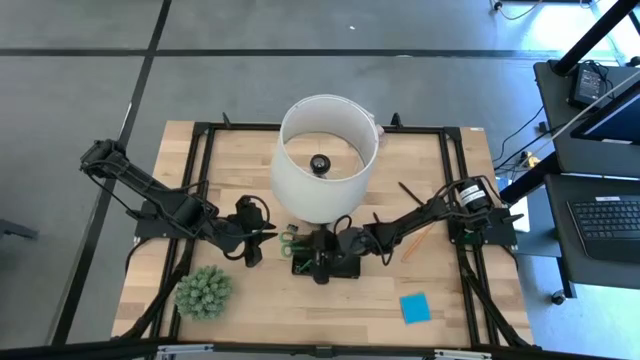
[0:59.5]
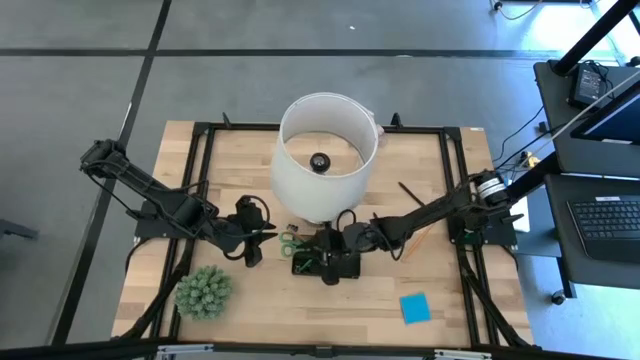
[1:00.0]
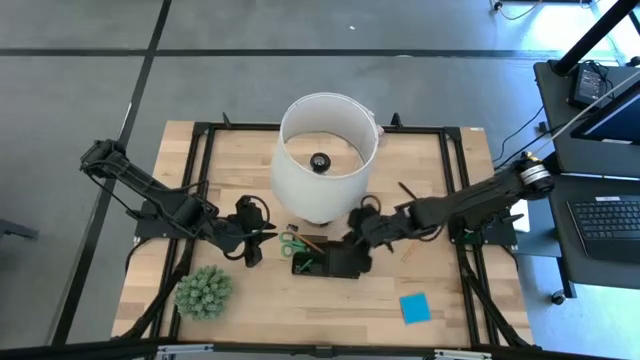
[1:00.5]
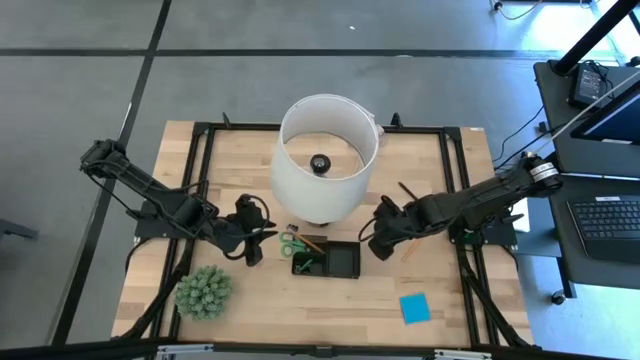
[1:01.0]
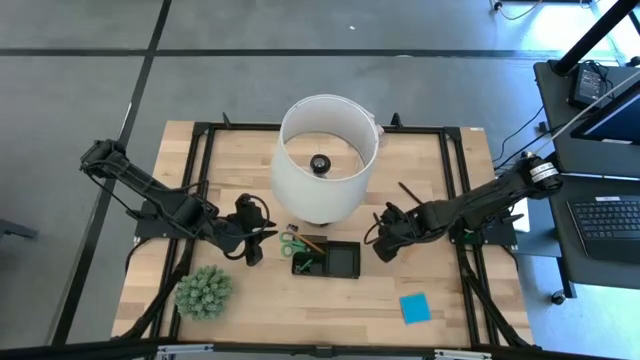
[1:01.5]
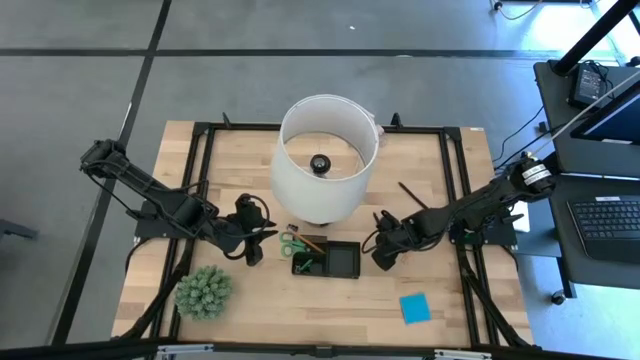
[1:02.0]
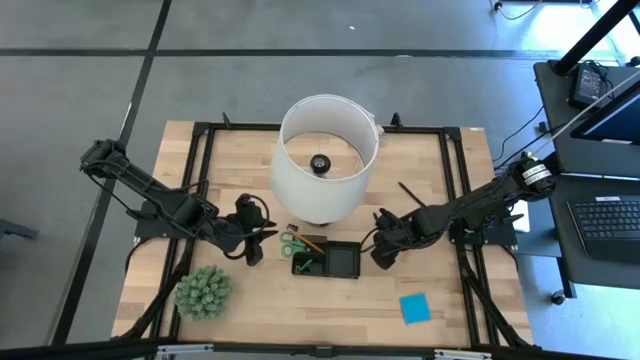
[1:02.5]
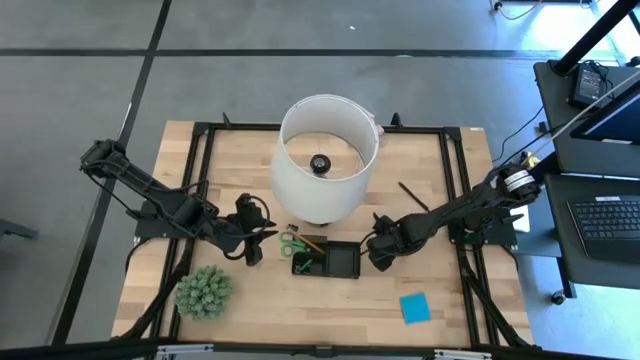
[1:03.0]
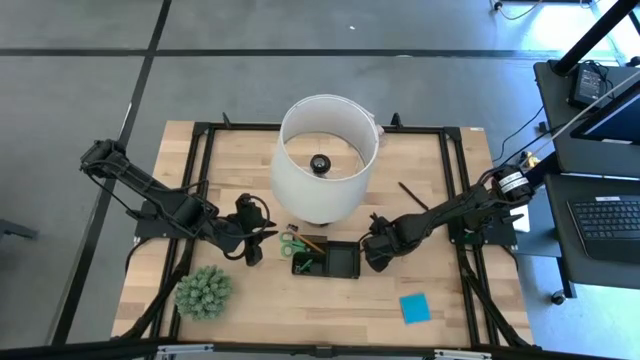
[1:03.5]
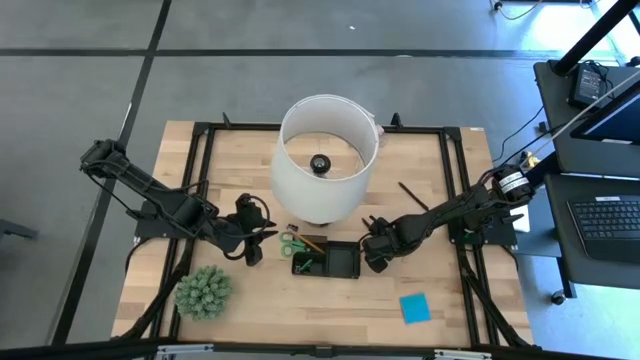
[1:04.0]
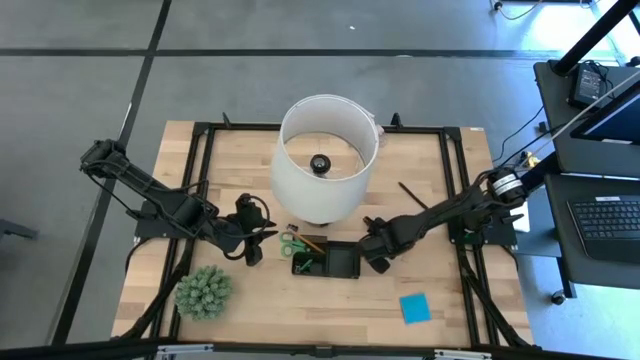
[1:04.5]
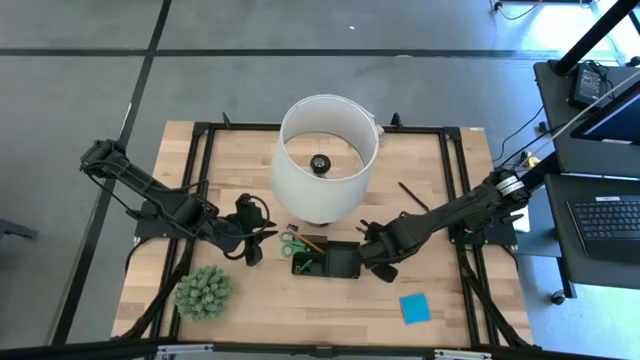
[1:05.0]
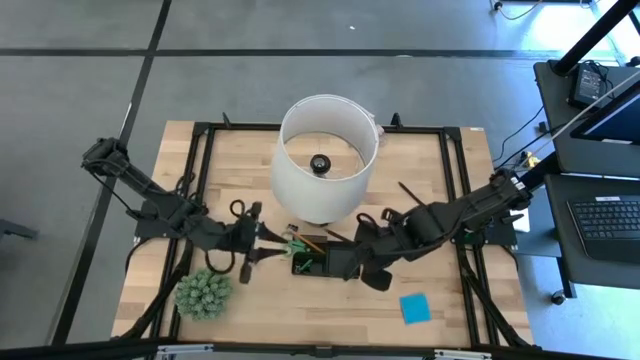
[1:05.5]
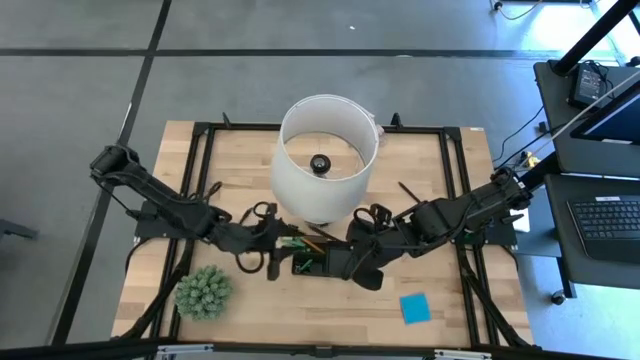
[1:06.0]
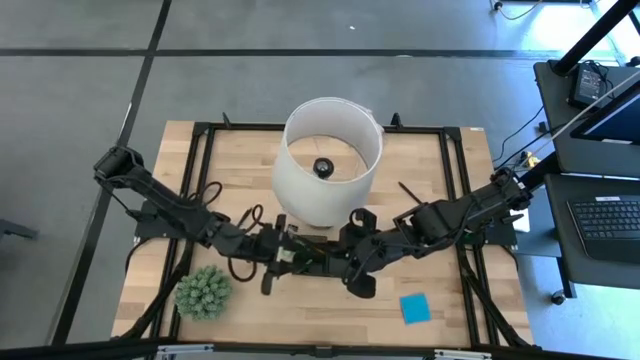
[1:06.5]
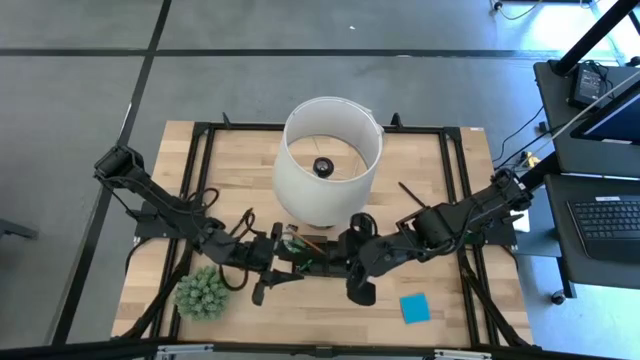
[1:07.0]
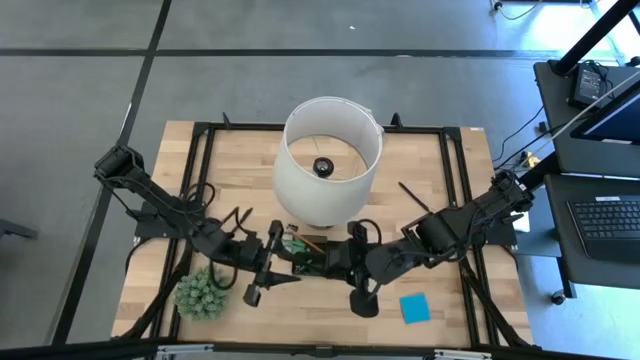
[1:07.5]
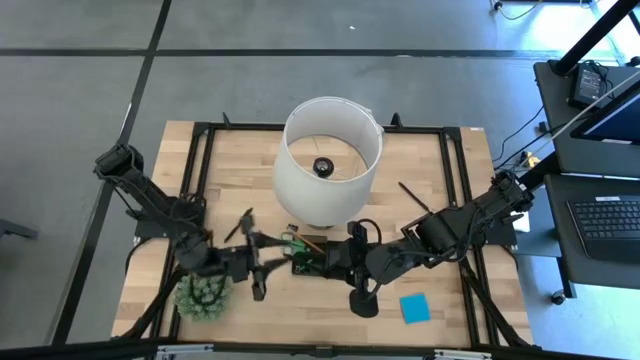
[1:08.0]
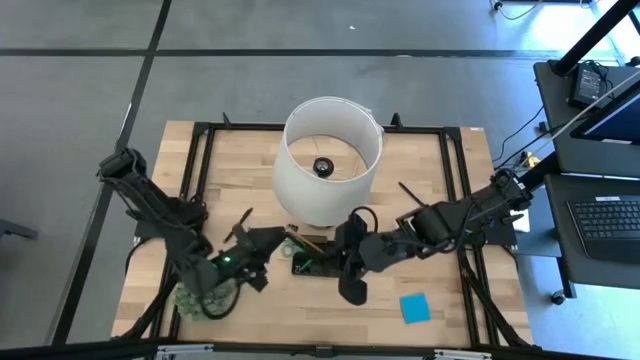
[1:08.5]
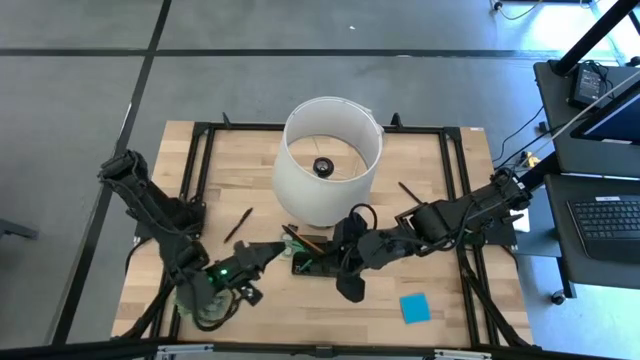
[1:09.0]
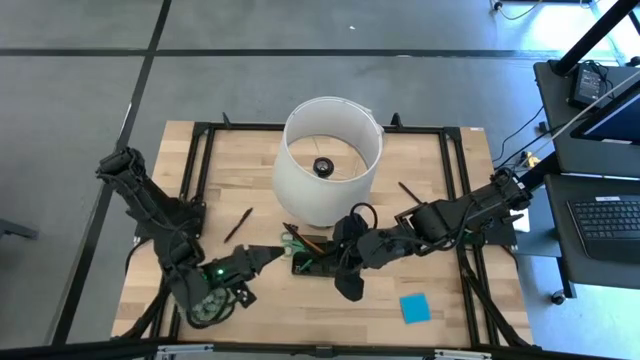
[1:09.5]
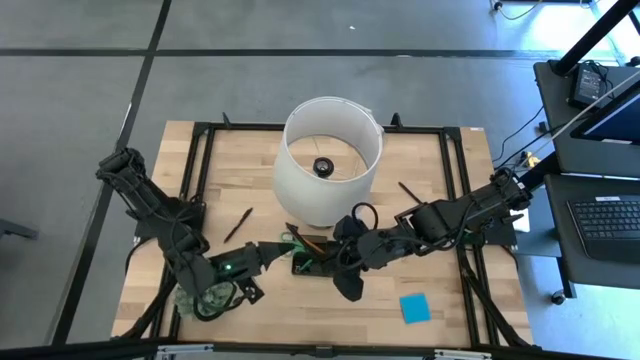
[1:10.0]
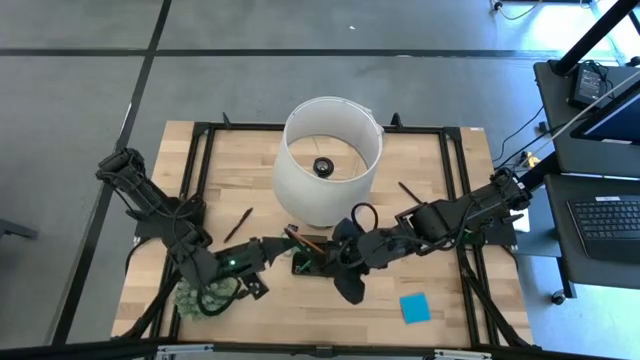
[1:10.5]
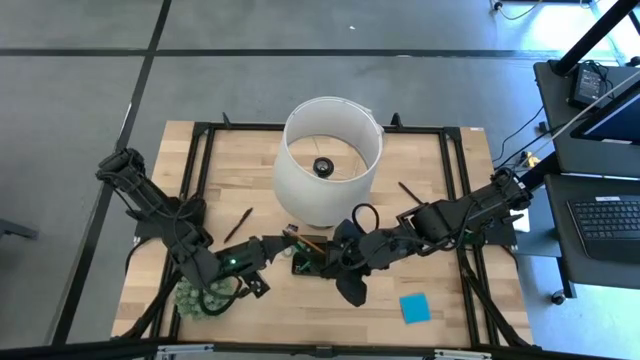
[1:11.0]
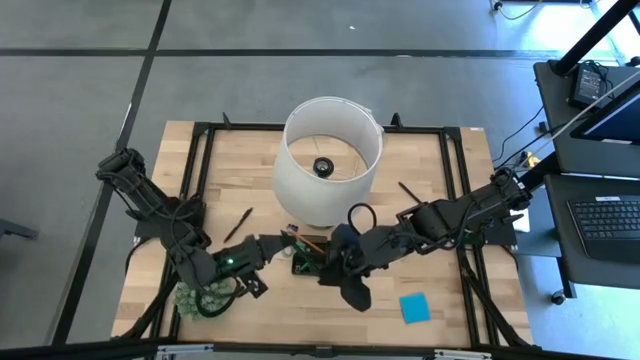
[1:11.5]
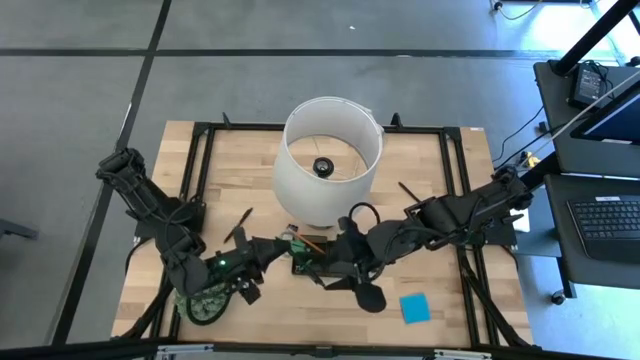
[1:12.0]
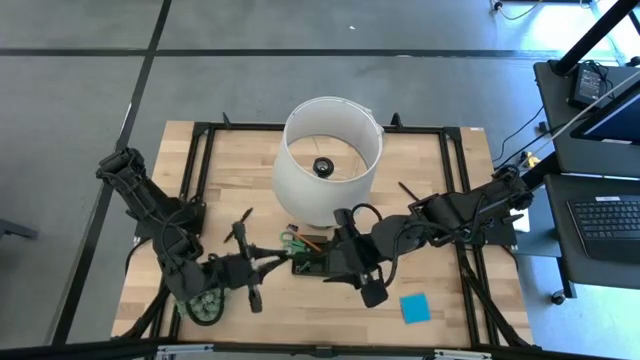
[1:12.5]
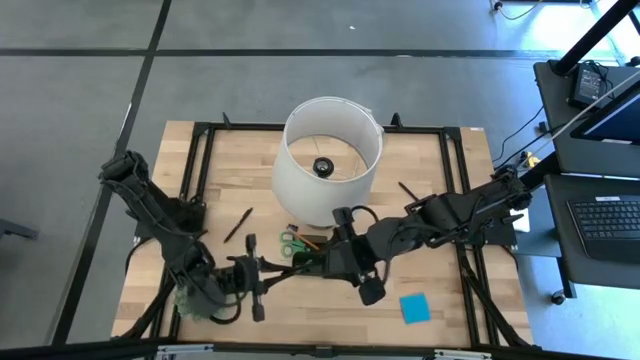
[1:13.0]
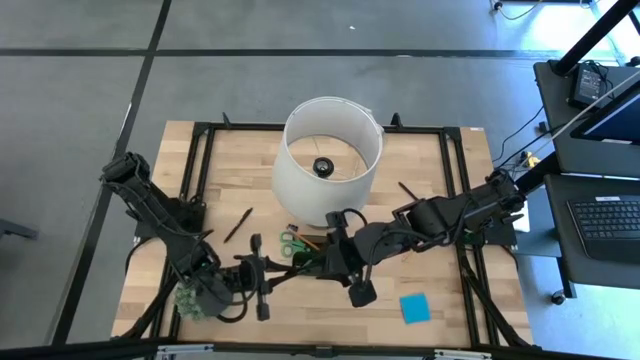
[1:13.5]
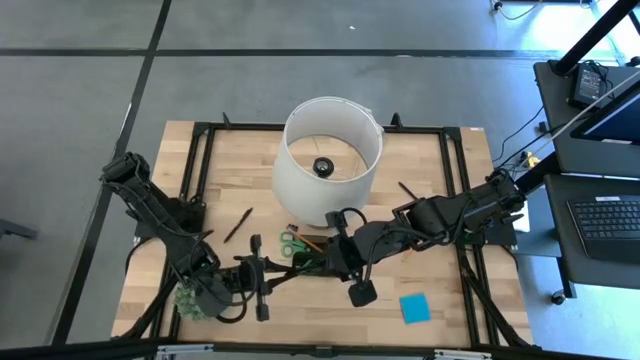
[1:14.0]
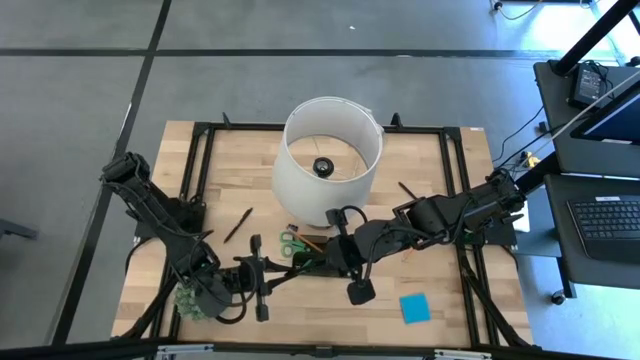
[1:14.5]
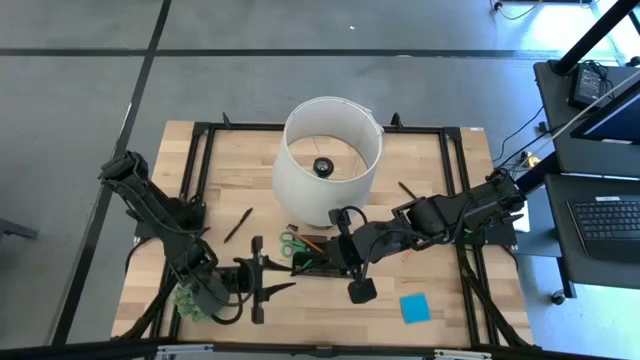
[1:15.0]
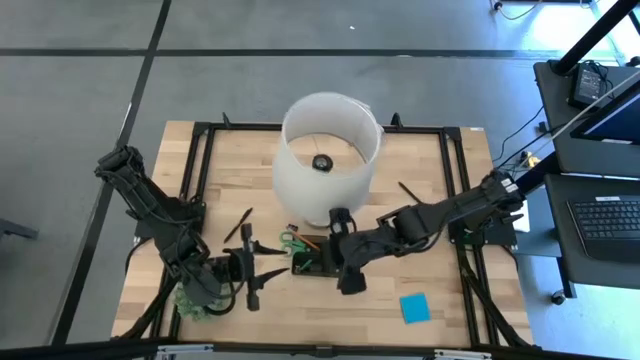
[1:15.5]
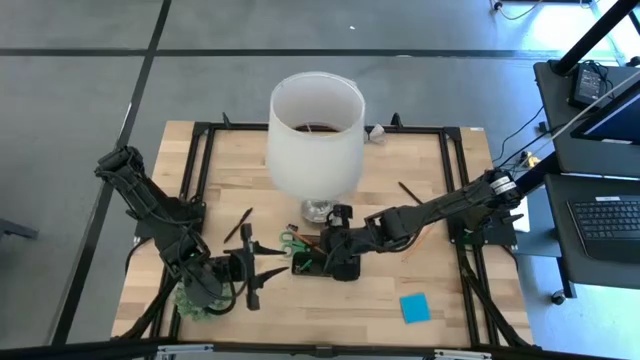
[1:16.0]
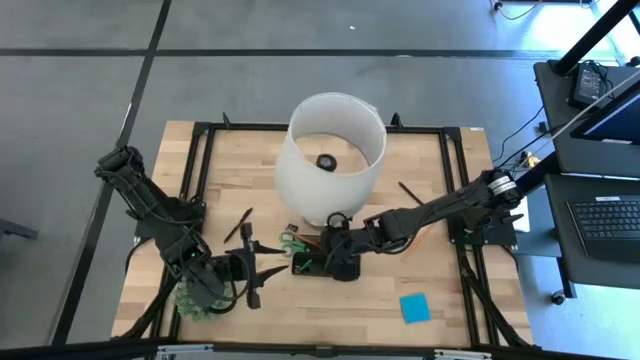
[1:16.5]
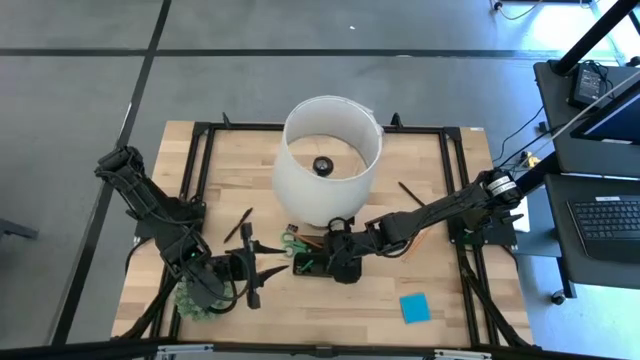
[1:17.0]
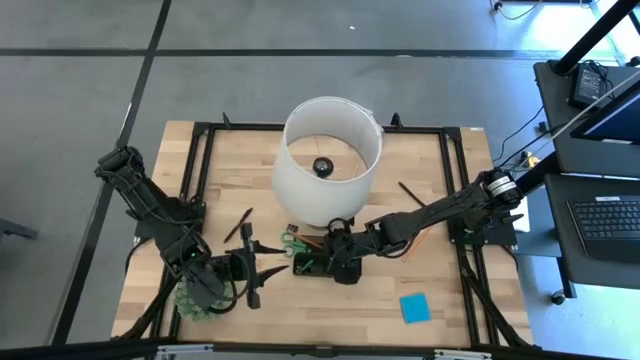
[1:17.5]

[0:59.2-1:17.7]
Task: Pick and place office supplies into organizer
Put the bottom right black pen into the black desk organizer

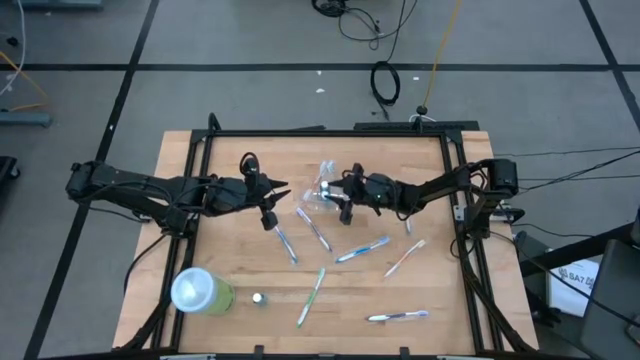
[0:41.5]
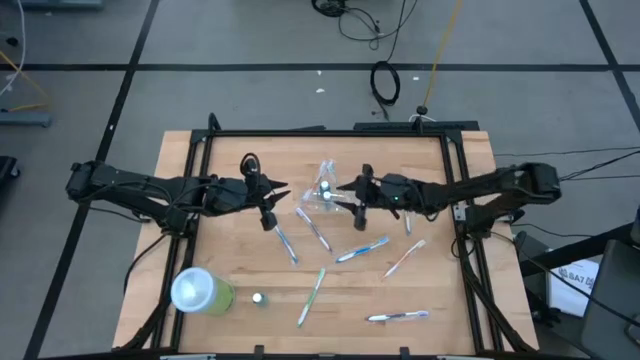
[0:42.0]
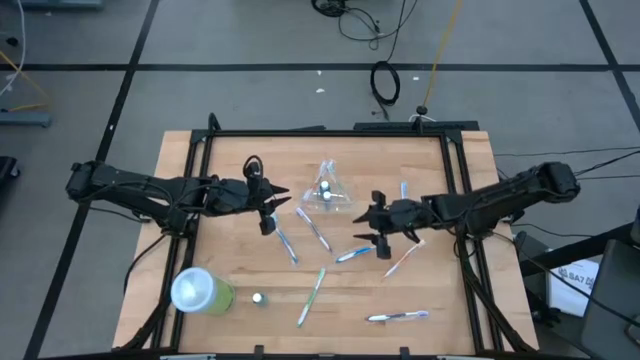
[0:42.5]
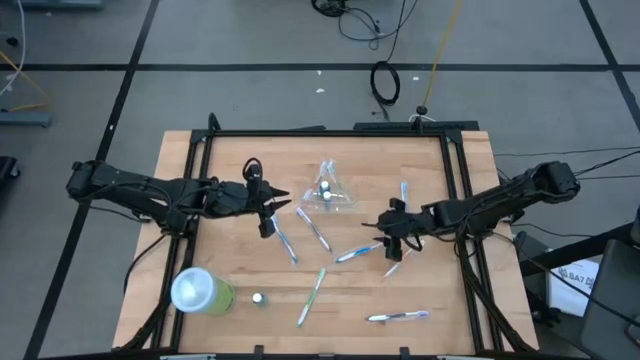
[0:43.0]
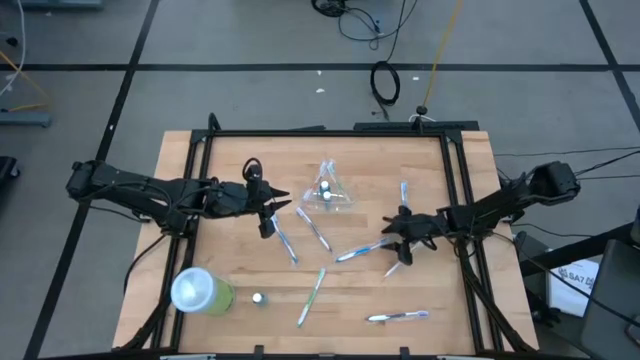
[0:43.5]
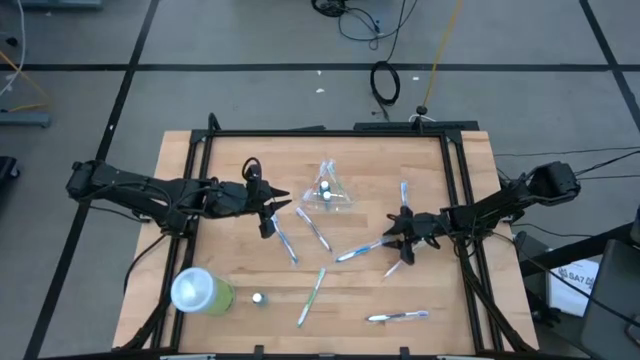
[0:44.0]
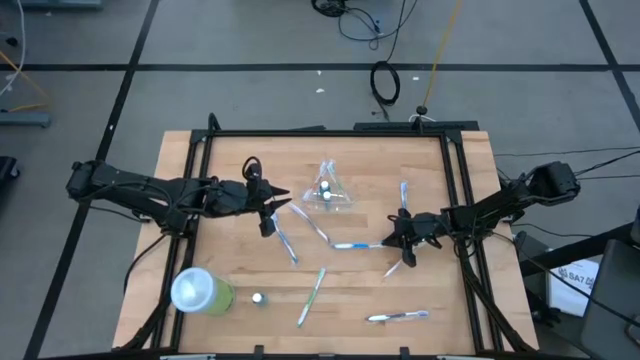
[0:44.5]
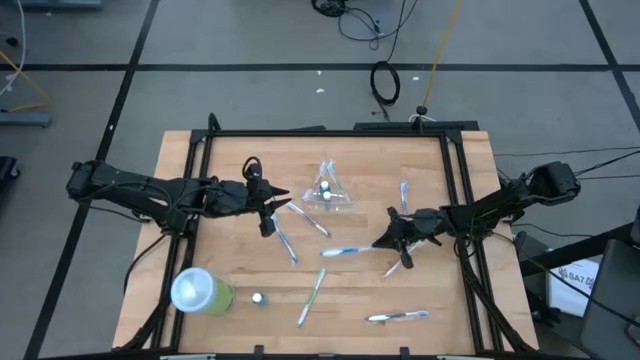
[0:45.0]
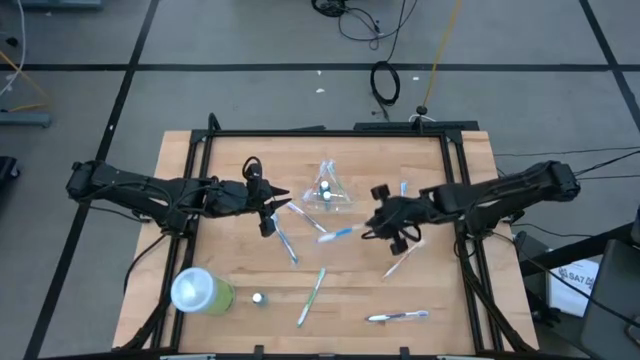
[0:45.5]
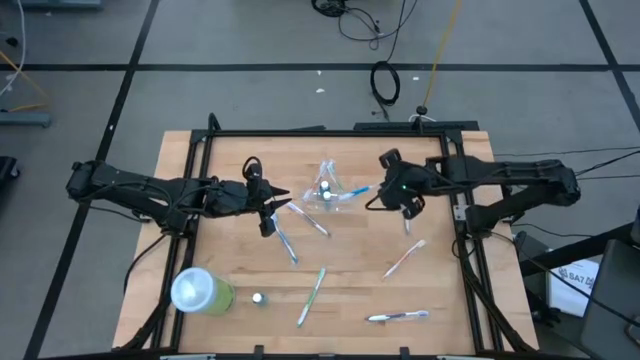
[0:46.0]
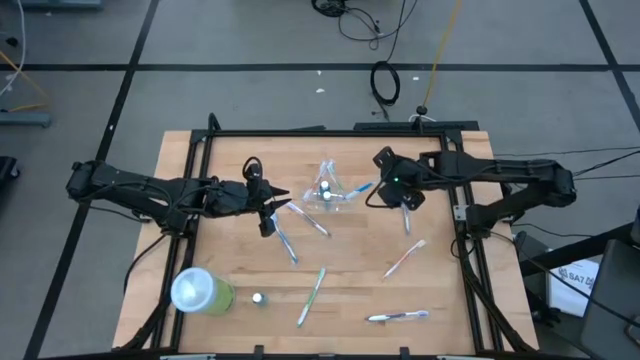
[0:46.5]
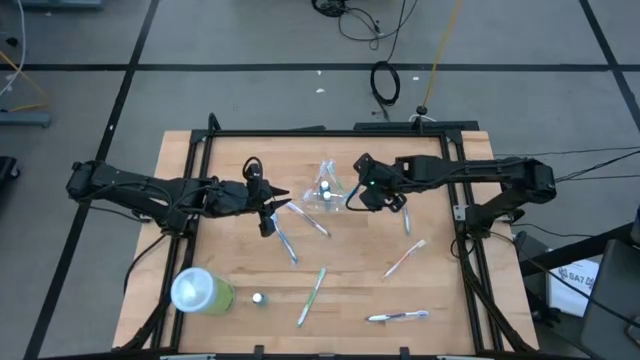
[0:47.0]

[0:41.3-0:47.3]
Task: Pick & Place toothbrushing station
Put the middle blue toothbrush into the transparent organizer
